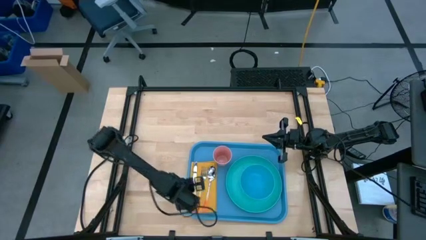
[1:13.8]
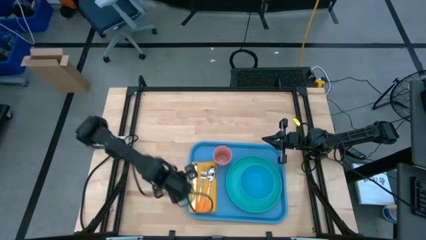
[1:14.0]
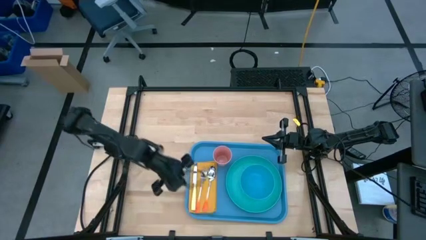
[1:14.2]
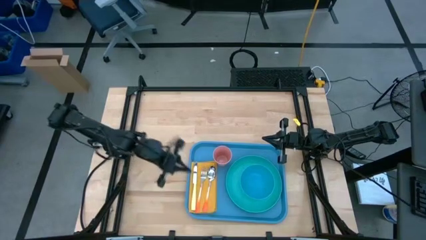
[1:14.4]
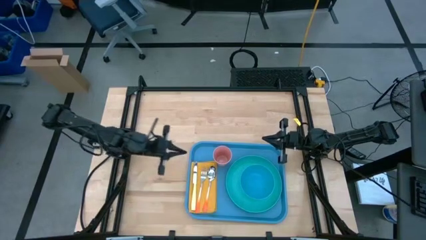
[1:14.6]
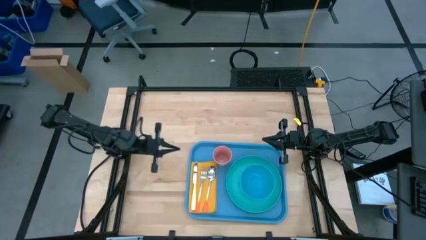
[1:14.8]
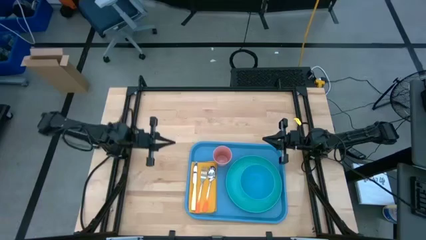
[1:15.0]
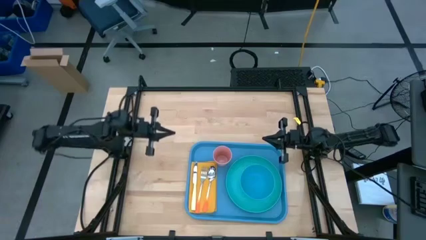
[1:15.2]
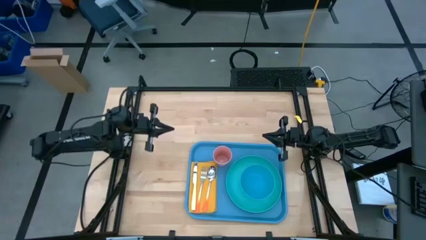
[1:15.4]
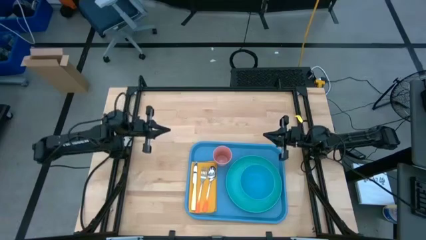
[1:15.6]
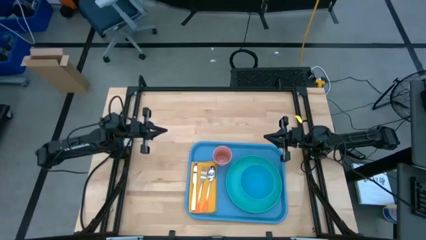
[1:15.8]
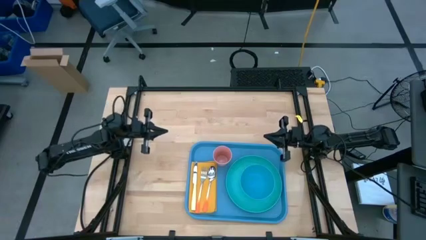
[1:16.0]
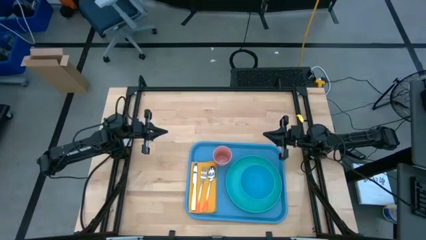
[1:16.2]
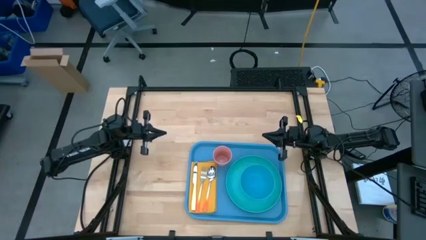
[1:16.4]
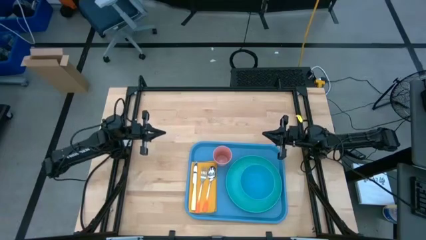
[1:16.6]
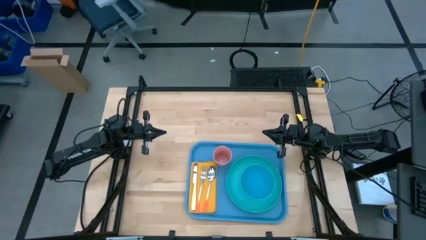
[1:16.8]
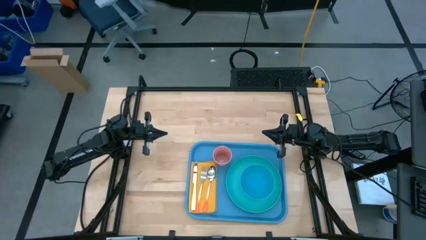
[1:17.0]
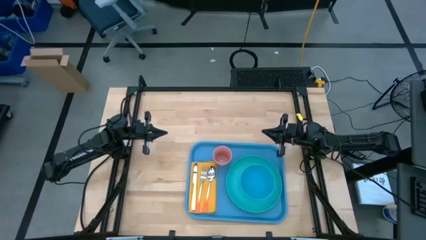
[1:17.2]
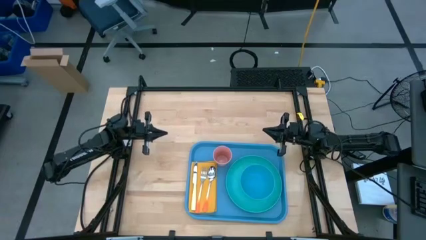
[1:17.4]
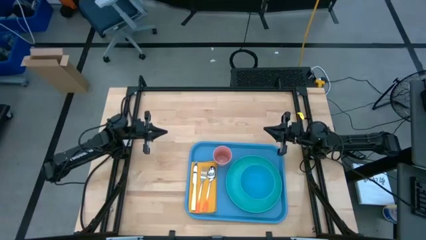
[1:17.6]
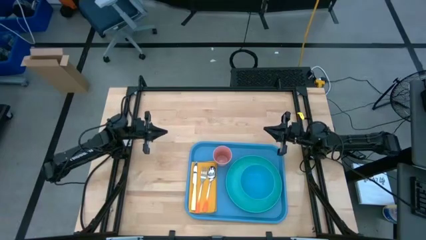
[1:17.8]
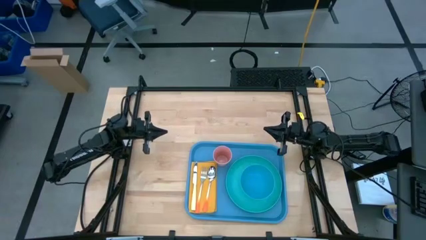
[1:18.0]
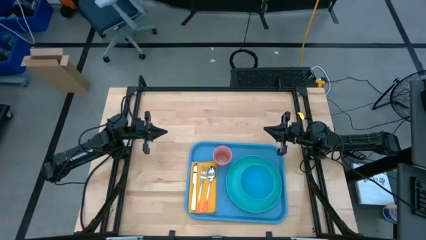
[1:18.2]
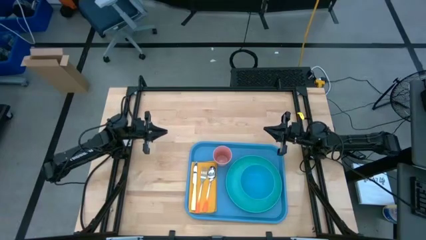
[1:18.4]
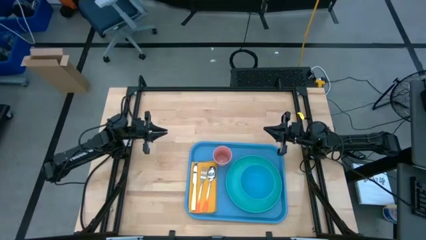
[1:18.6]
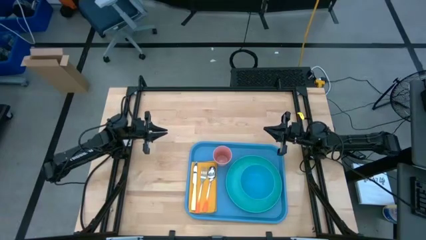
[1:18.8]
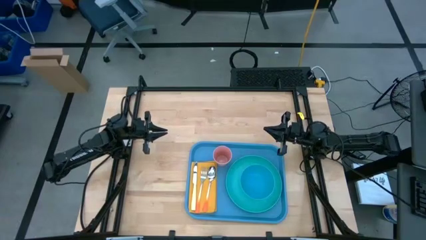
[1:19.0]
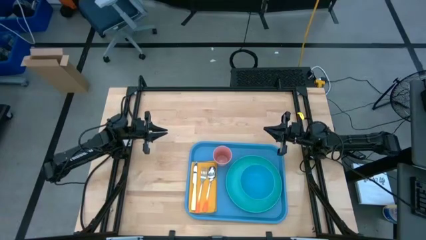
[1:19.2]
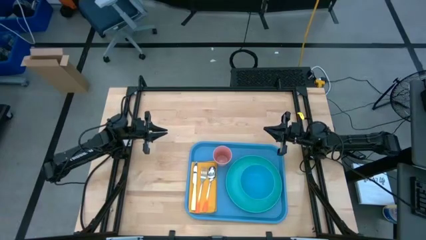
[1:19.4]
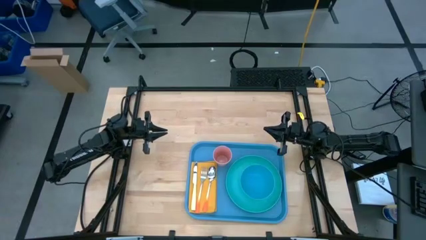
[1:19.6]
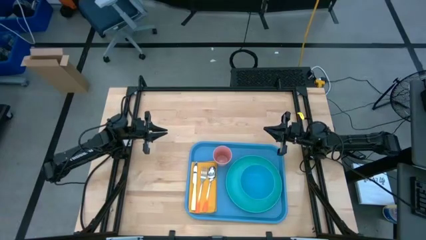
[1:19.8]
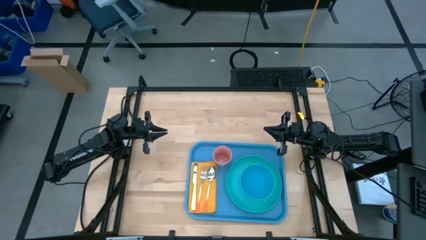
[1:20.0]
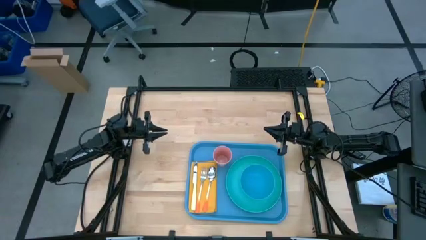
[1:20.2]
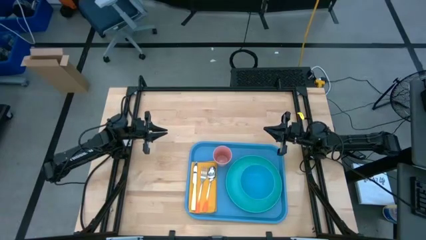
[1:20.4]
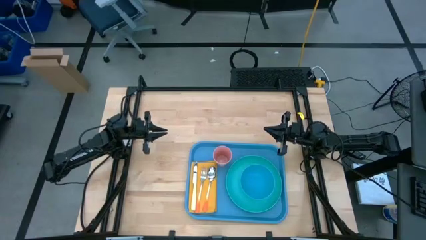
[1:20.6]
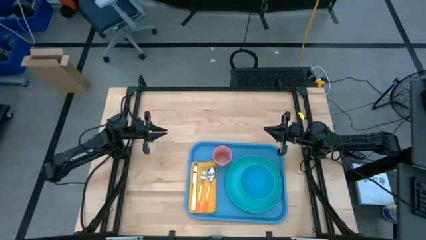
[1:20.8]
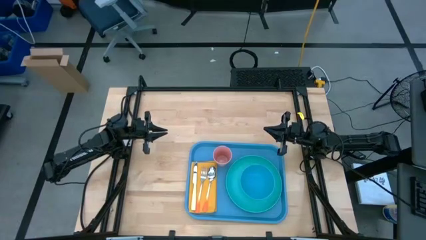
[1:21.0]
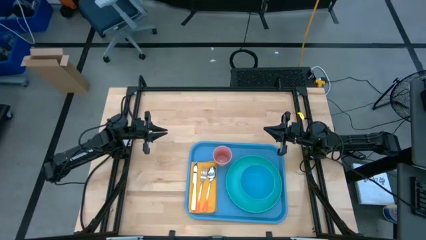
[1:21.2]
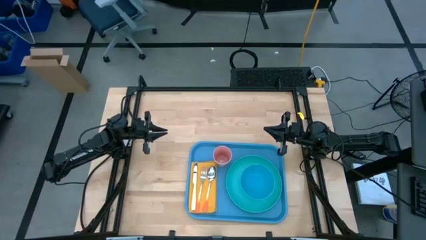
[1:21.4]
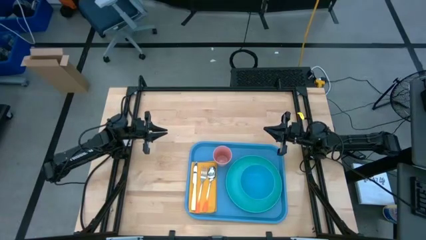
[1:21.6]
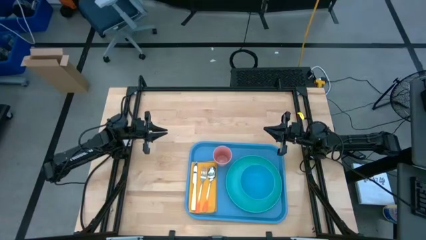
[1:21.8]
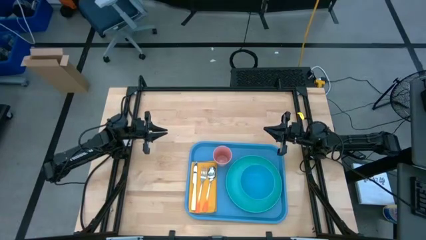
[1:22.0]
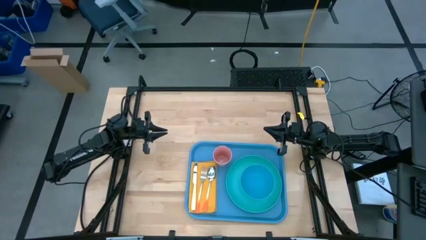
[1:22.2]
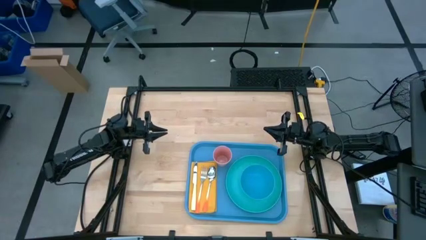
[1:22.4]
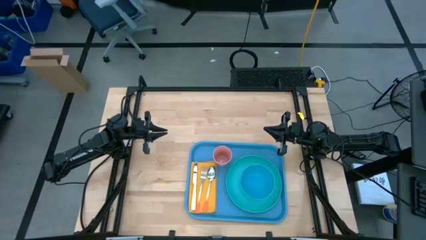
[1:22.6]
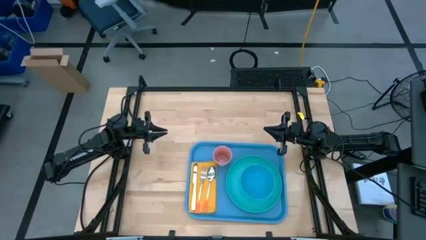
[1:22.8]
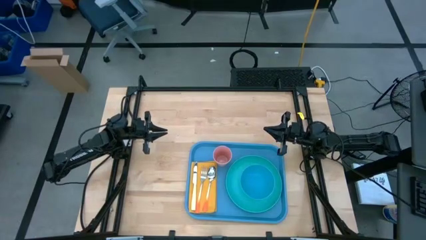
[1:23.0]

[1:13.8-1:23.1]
Task: Set up tray
Return to Home Position

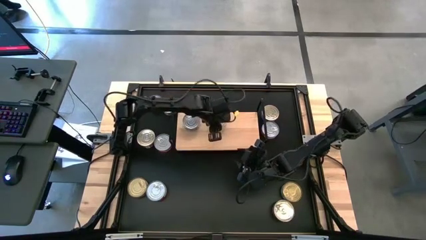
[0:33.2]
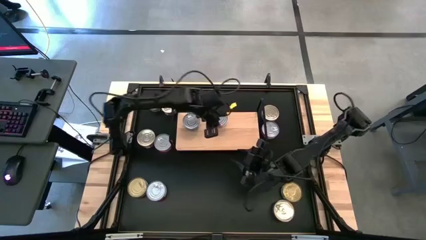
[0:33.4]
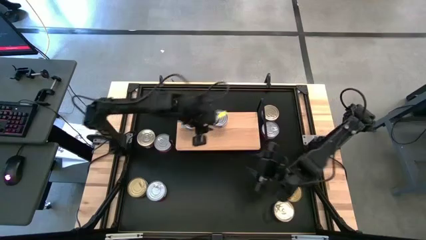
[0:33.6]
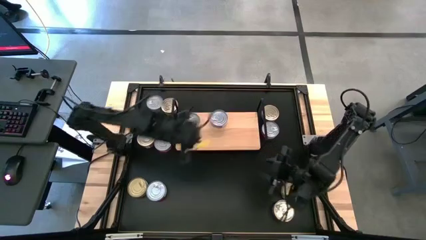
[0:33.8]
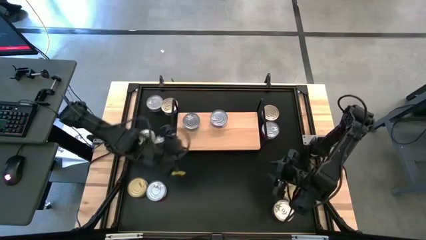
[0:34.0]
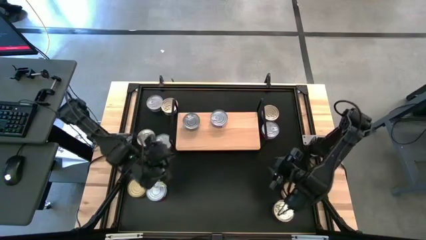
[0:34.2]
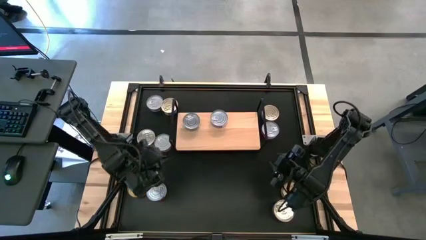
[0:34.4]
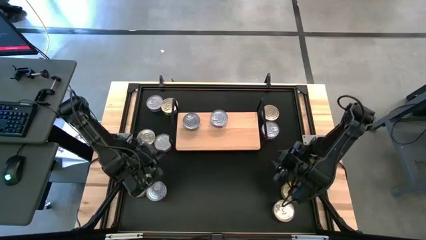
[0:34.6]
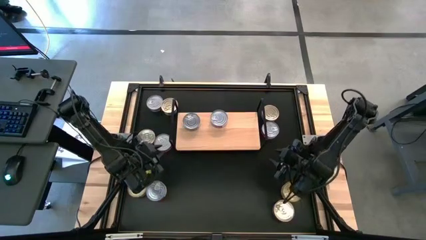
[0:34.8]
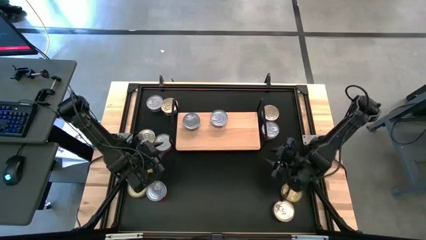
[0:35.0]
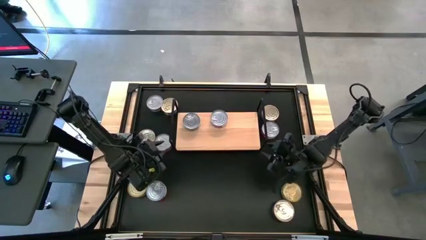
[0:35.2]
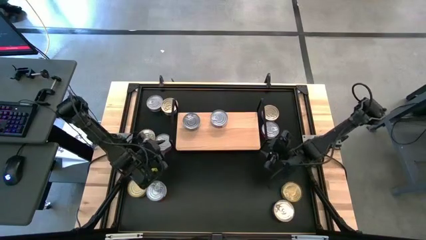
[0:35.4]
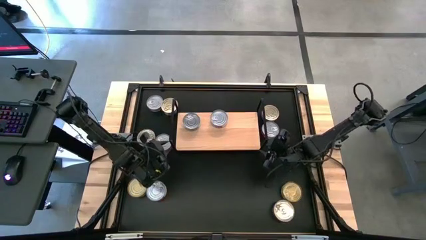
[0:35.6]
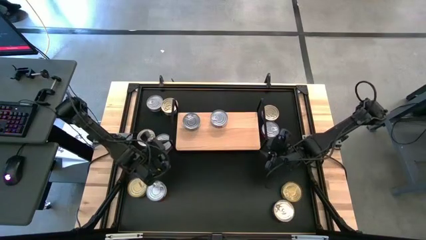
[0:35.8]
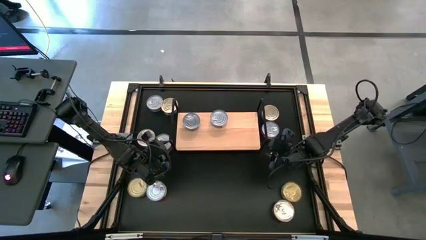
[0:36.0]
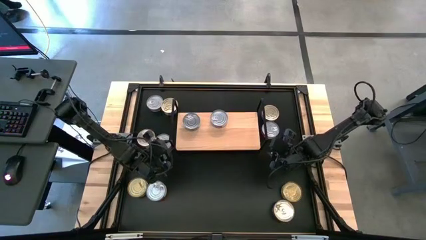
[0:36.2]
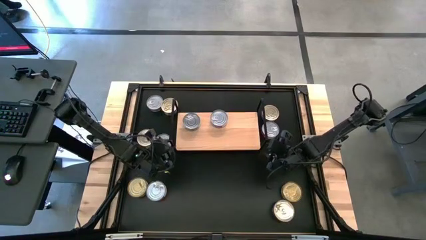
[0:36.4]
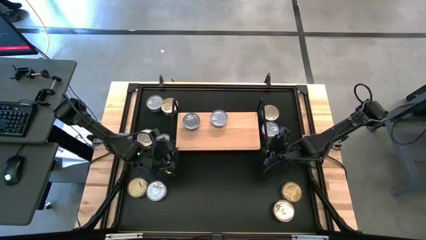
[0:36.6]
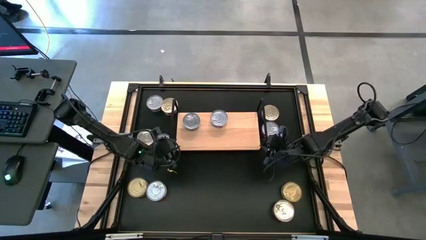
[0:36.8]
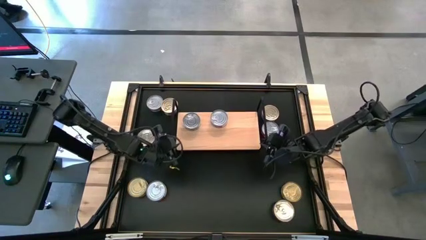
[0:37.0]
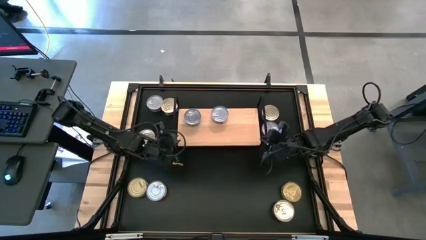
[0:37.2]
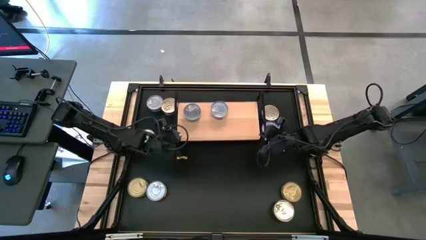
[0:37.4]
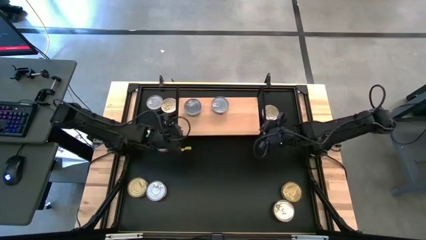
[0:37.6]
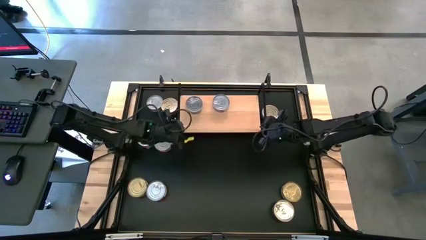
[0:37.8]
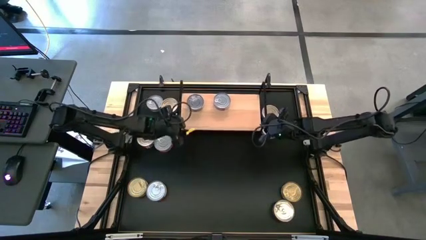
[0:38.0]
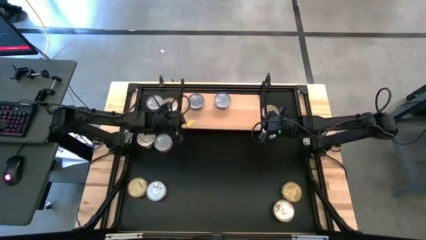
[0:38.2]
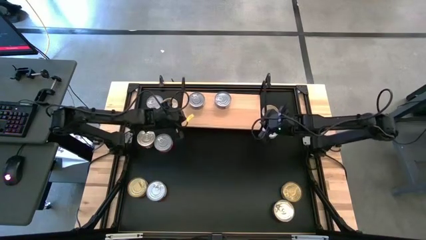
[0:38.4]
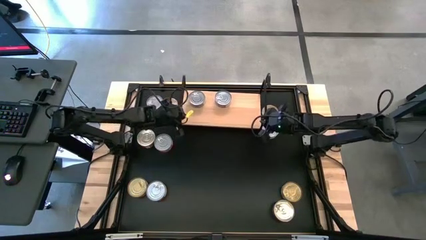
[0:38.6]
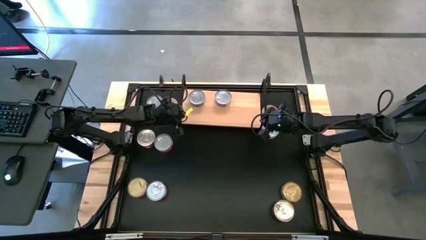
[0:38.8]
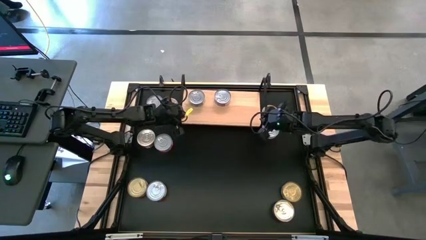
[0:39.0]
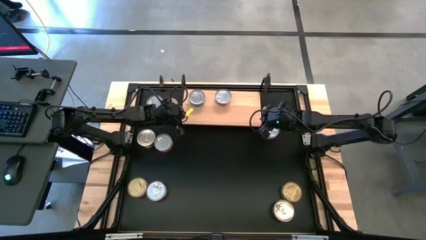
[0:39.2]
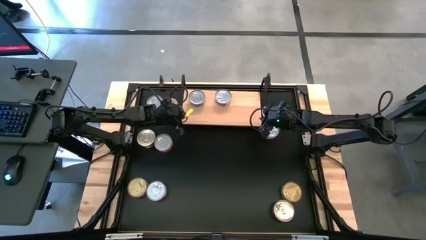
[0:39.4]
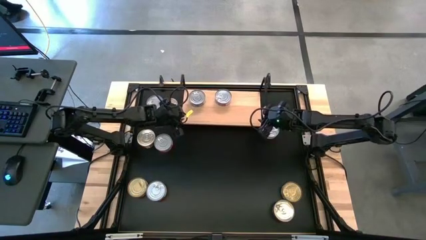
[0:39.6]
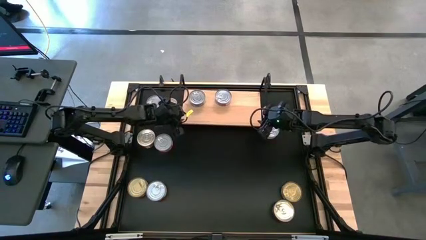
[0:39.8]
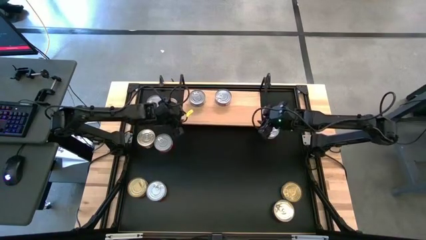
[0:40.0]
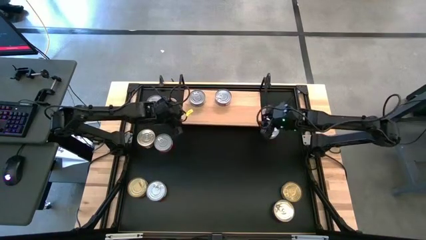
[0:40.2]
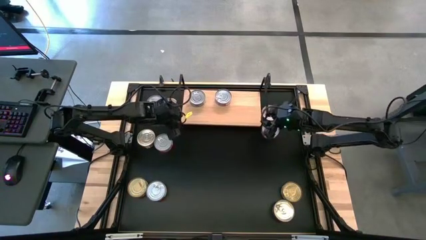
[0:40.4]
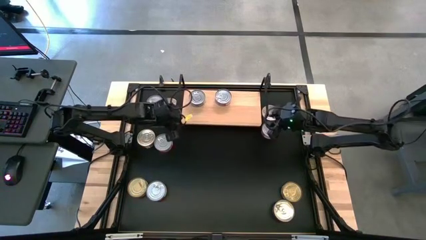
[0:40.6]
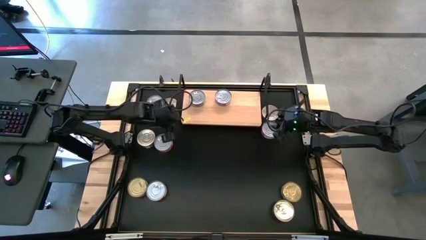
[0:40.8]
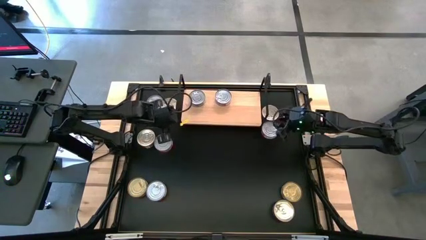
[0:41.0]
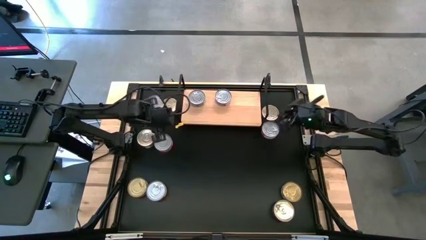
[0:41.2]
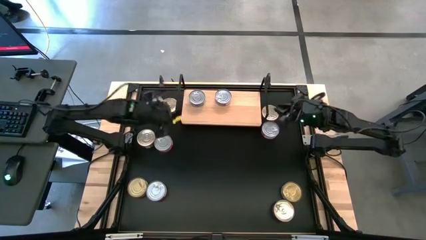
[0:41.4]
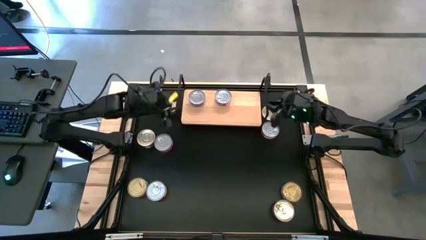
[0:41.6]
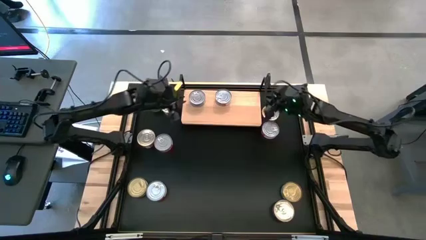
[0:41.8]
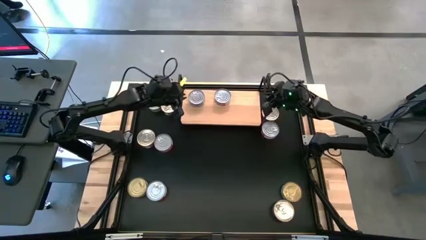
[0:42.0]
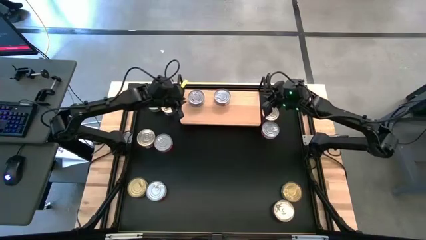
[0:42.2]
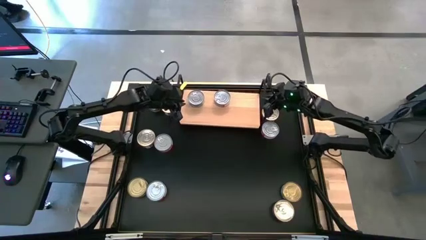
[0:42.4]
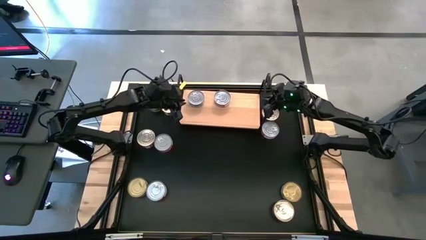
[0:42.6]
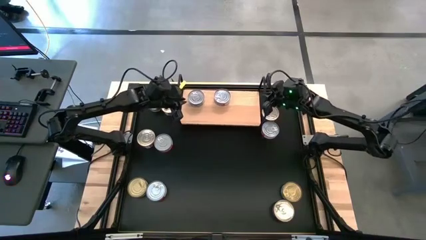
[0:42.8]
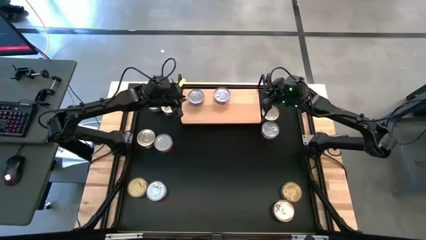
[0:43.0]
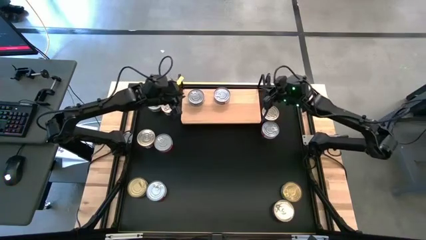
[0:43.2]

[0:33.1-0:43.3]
Task: Stack canned seafood by type on shelf
Move the shelf to the top
